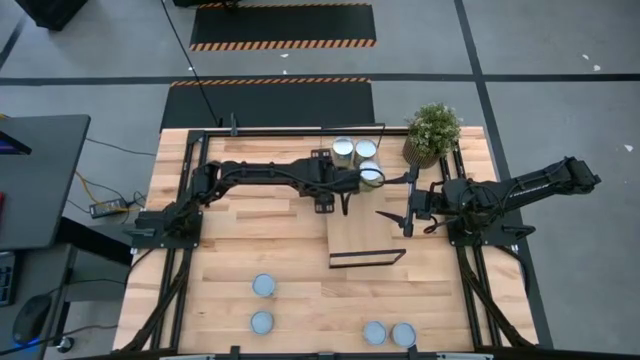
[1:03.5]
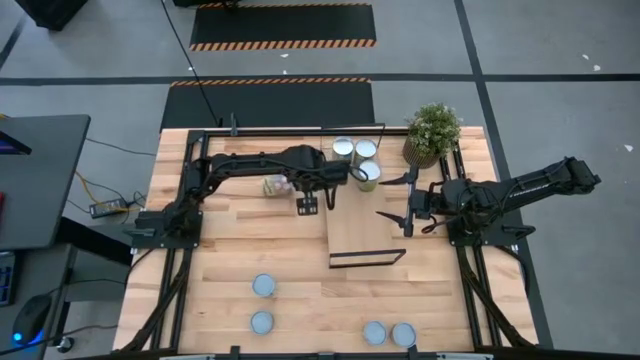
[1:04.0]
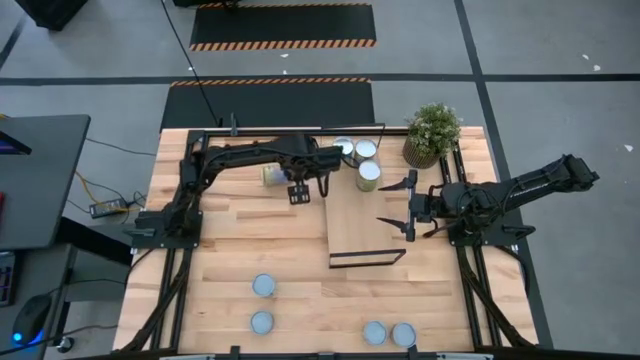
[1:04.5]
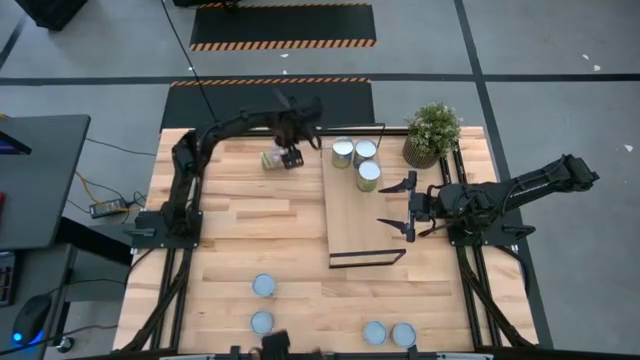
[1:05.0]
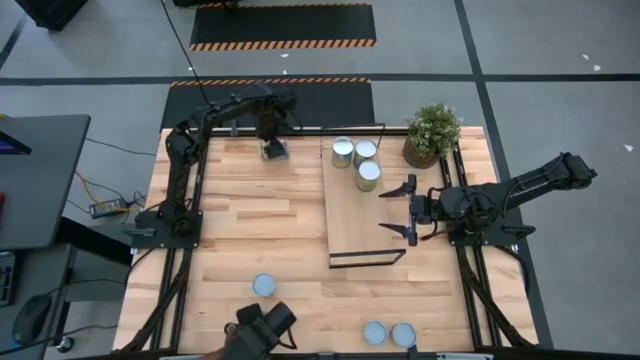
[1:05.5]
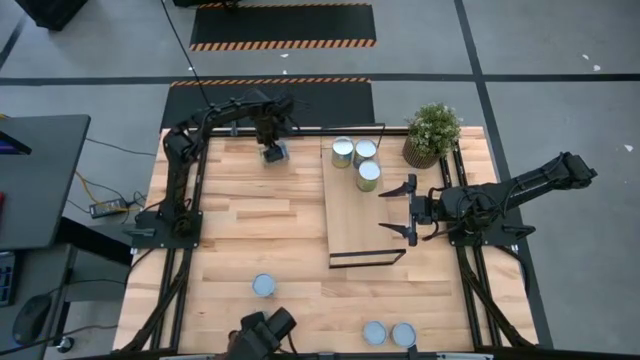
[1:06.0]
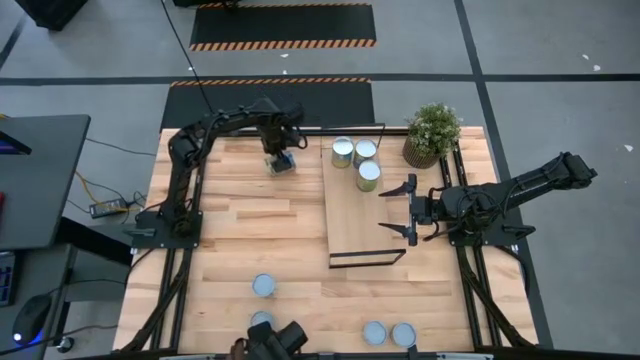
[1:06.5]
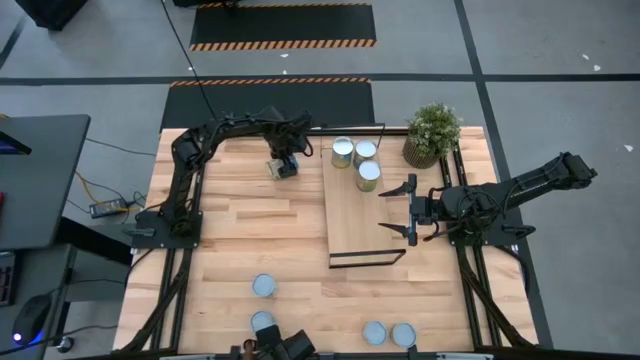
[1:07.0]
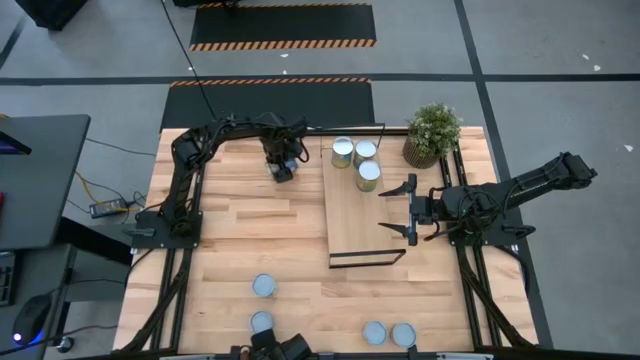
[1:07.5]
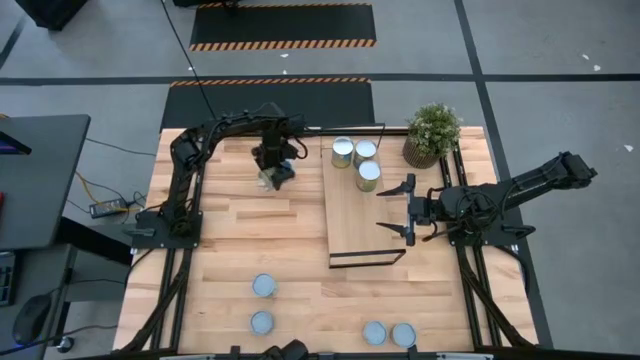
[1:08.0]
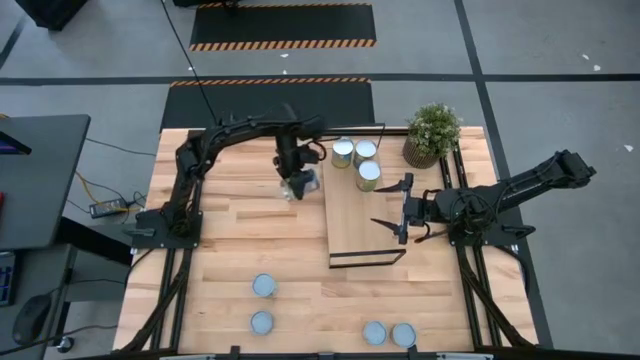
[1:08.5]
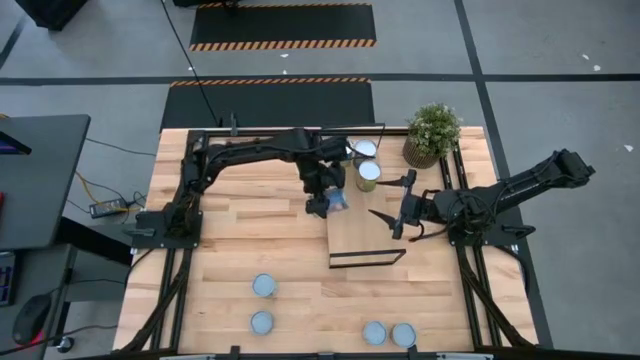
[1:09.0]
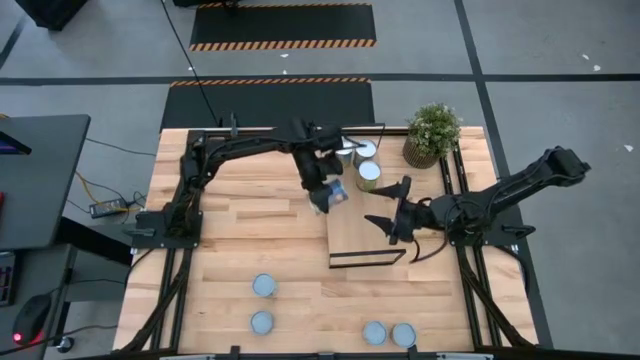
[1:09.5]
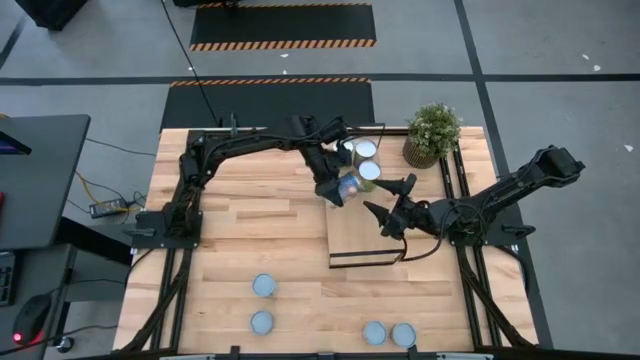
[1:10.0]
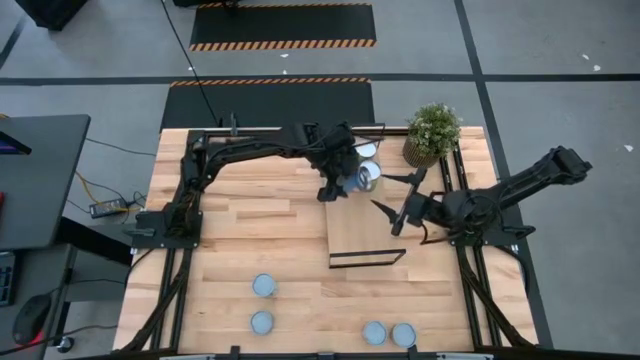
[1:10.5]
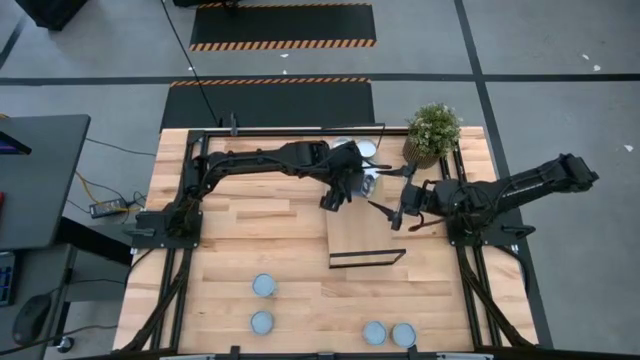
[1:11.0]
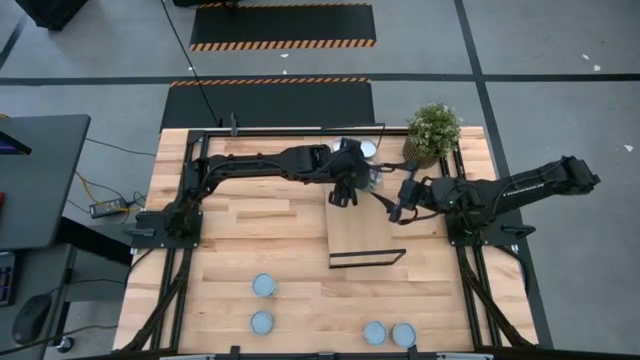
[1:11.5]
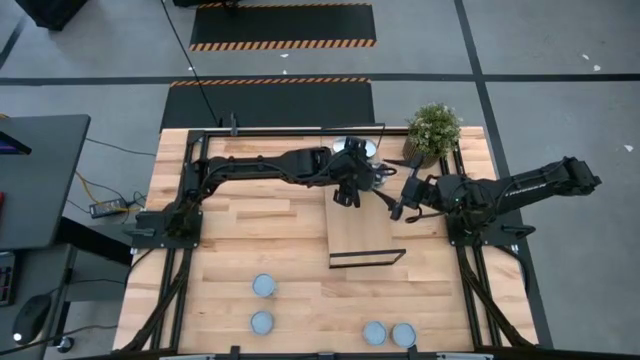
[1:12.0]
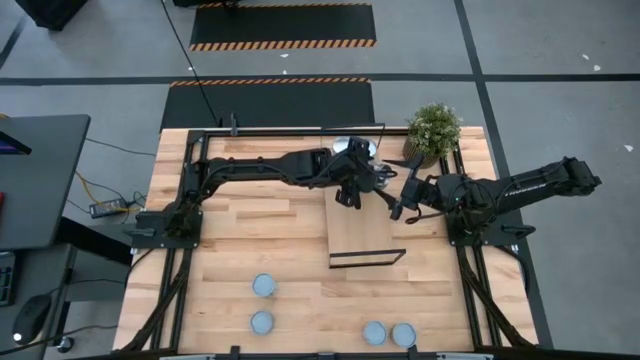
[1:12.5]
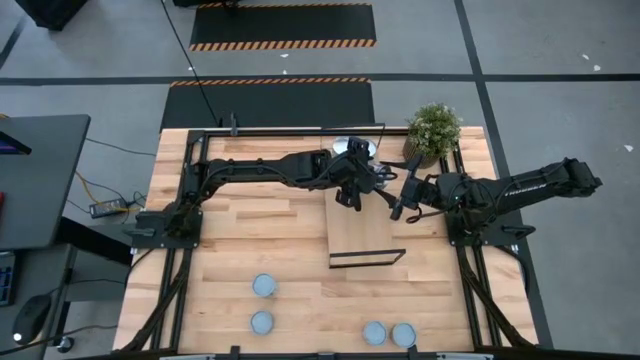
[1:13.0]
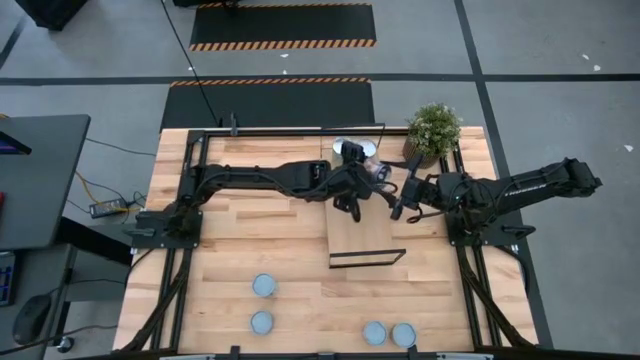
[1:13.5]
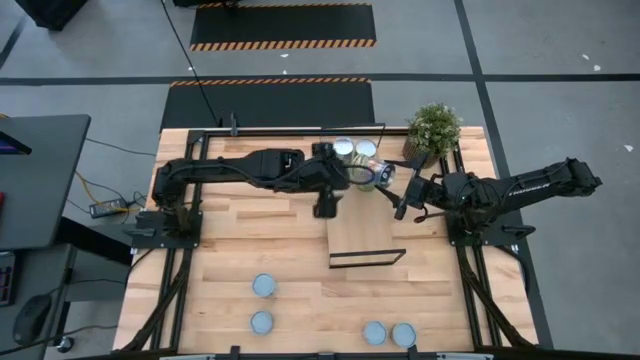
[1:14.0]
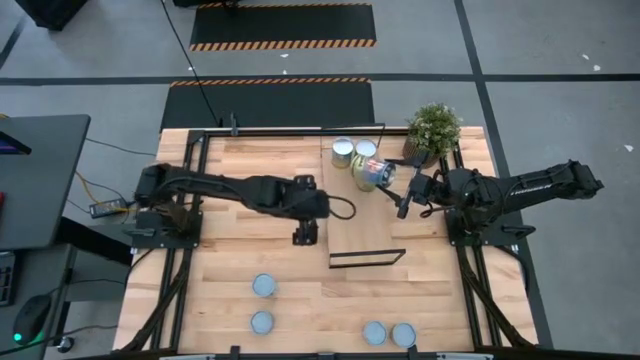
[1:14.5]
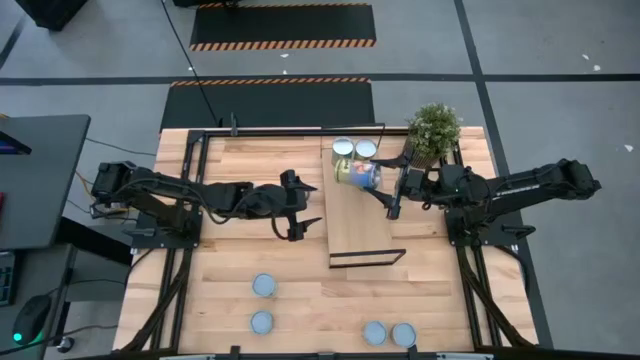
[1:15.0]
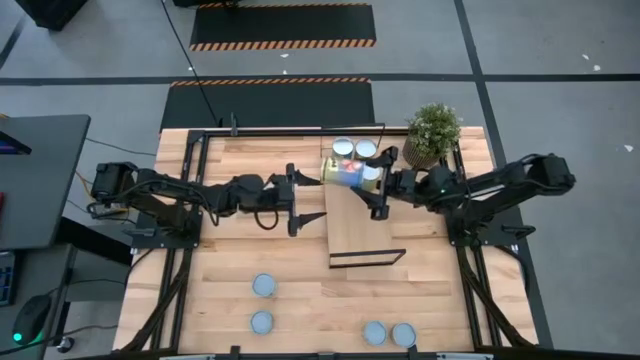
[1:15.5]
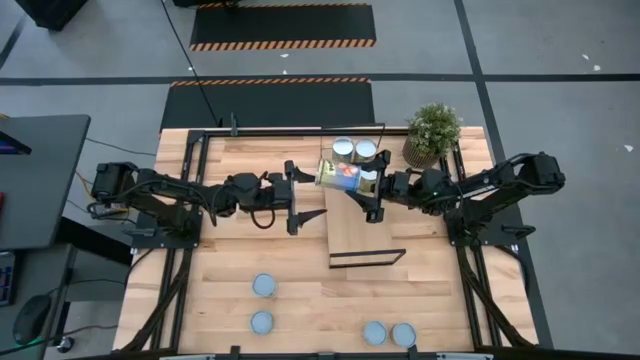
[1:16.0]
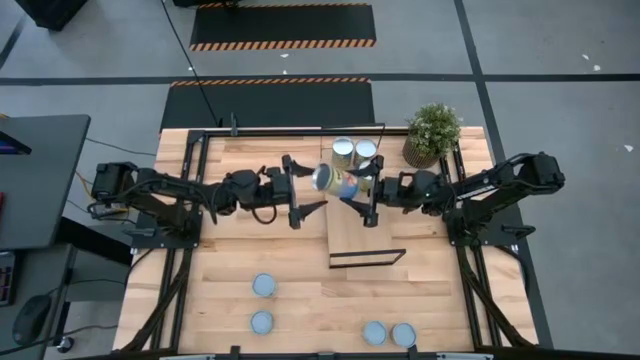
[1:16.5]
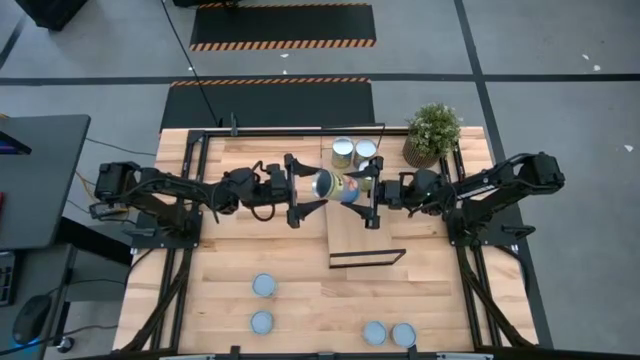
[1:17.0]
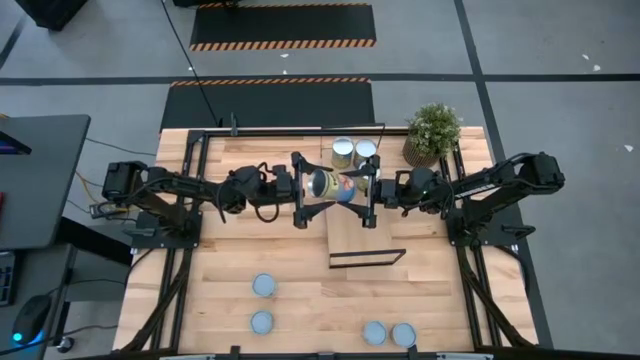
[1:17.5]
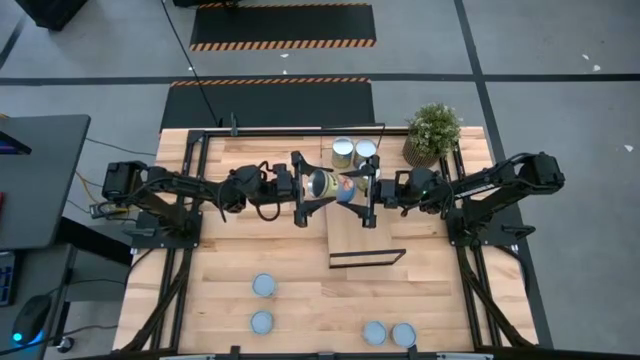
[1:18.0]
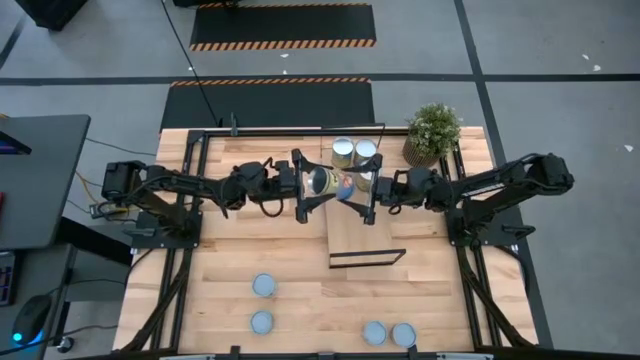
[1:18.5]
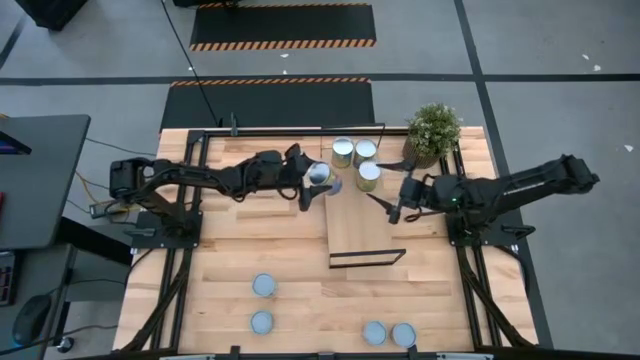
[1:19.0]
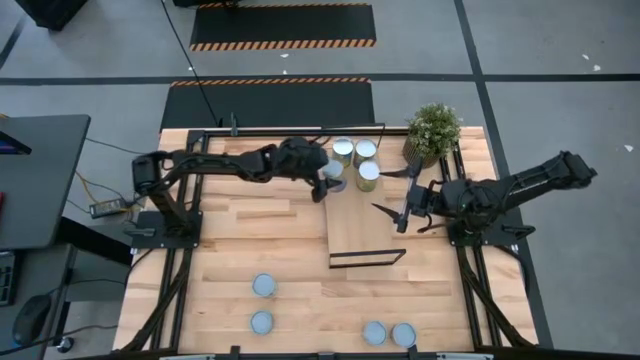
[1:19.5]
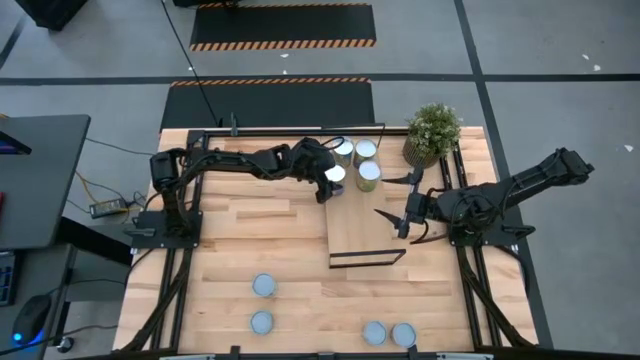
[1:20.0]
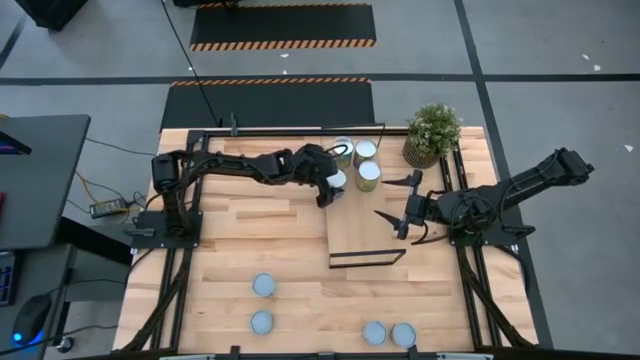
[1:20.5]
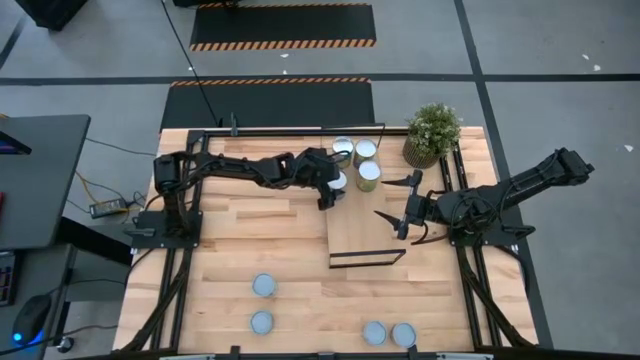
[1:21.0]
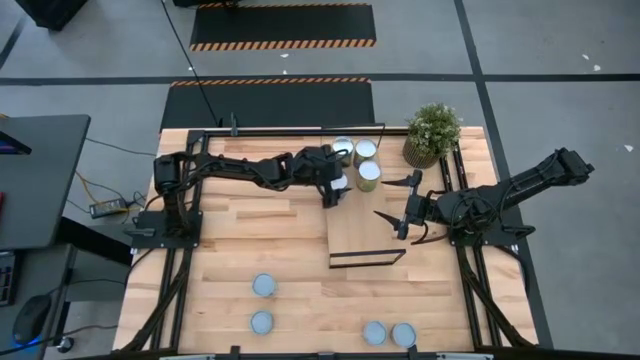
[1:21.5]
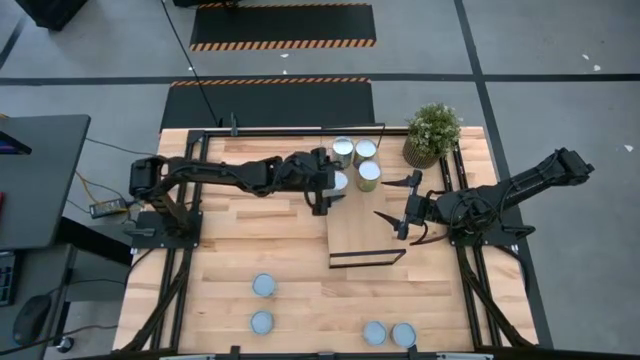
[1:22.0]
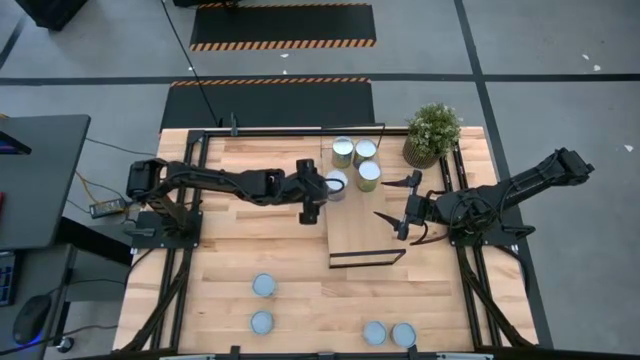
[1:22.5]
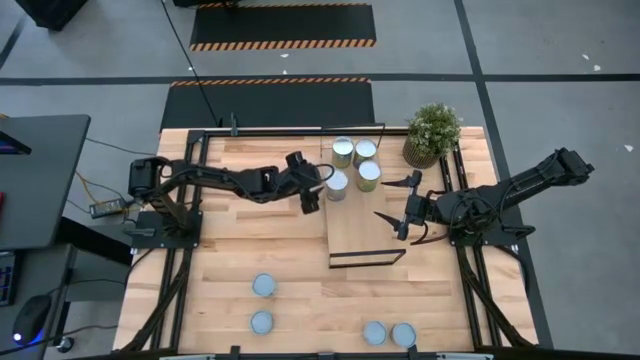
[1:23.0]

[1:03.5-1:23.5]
Task: Pick and place cans onto a shelf
Put the canned peaches on the shelf

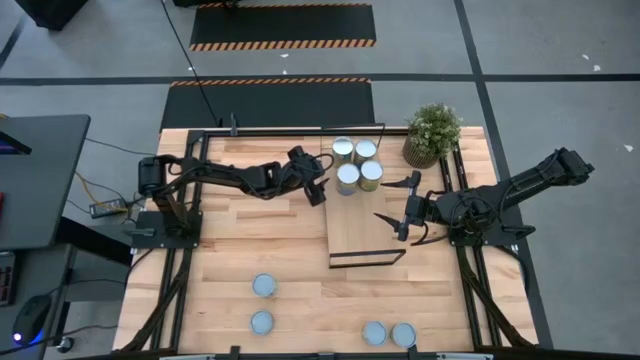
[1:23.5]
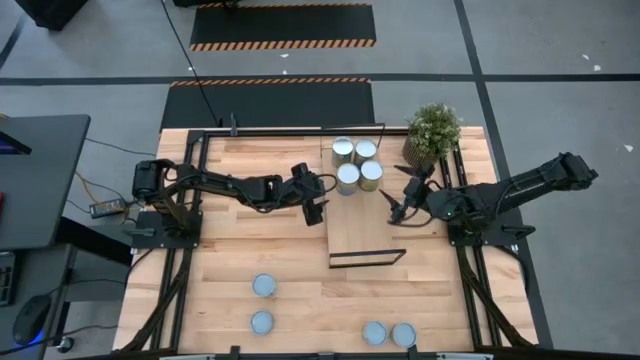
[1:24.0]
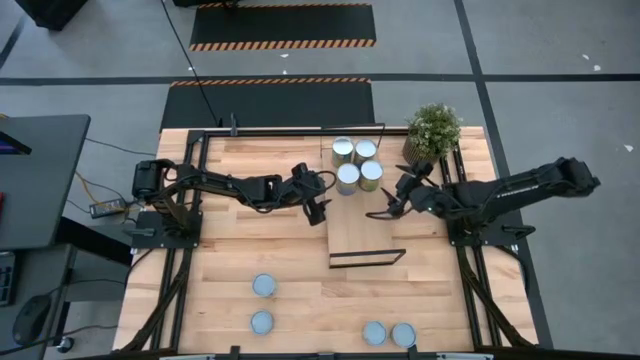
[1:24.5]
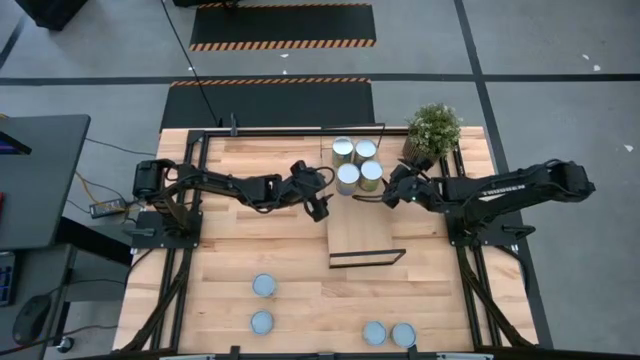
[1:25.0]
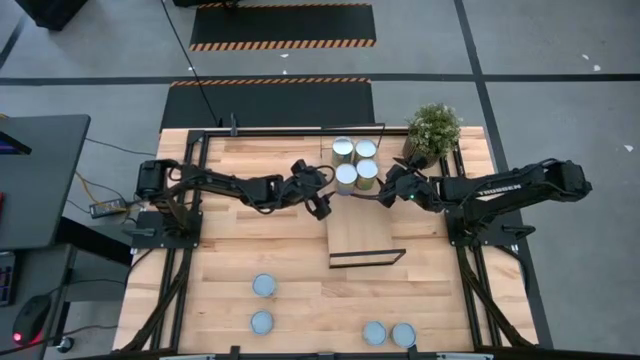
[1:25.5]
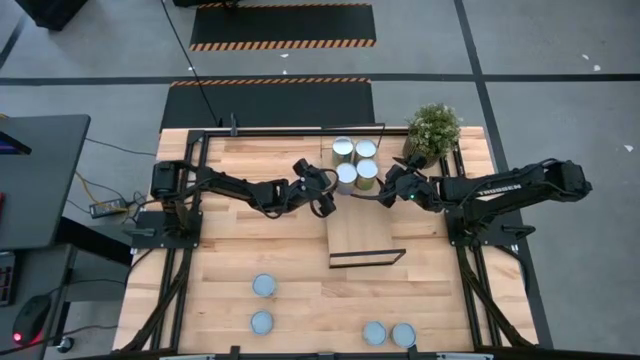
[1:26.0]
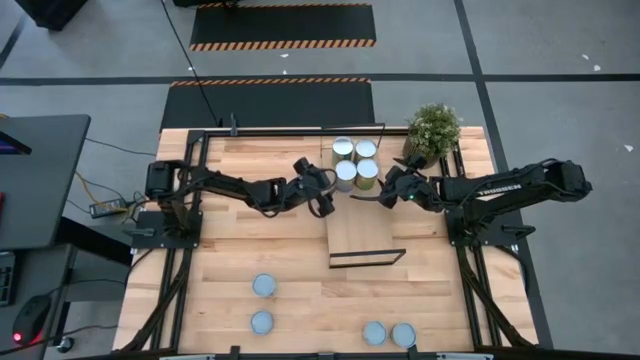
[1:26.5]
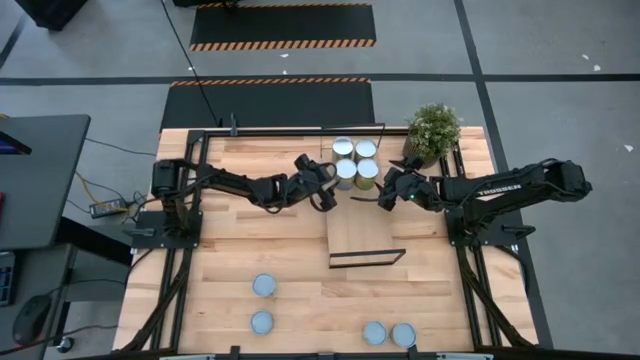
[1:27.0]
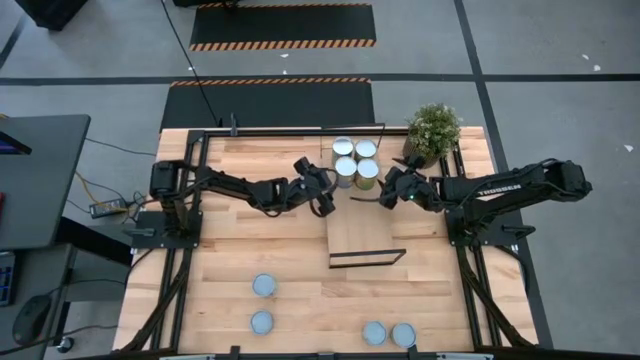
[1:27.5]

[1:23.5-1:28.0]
Adjust the cans on the shelf
